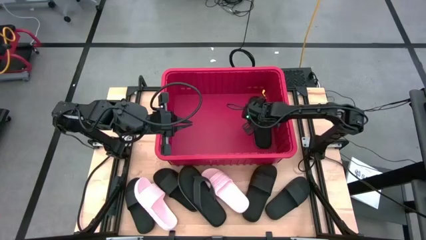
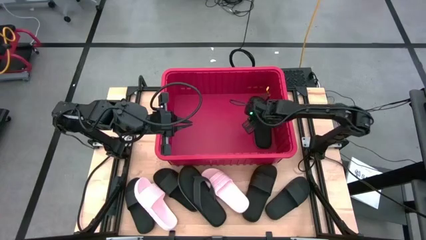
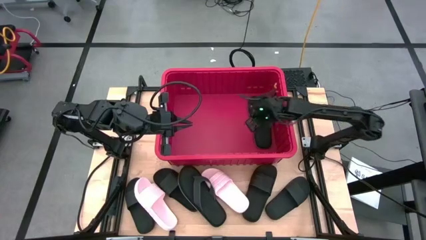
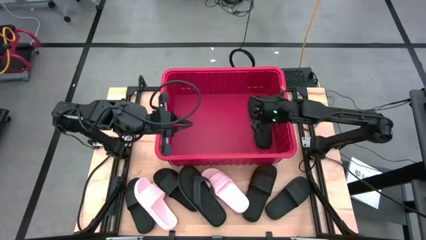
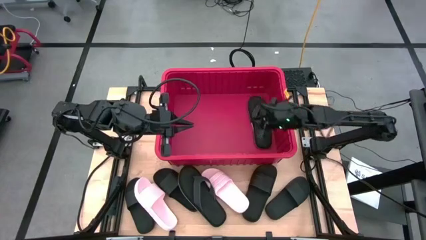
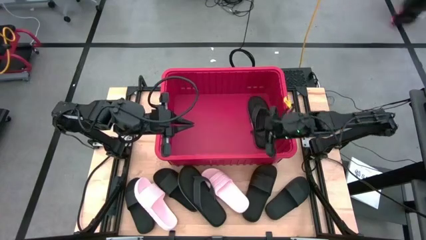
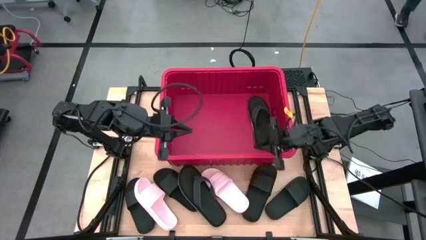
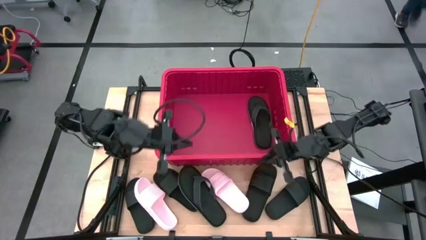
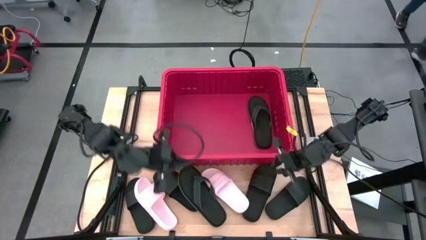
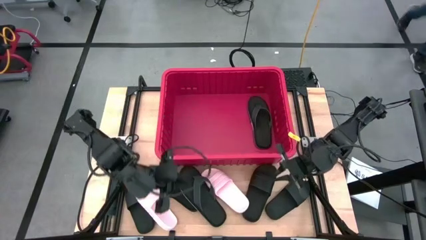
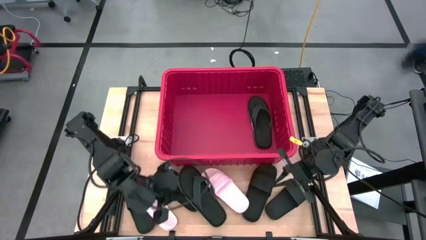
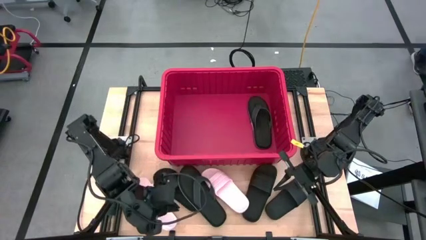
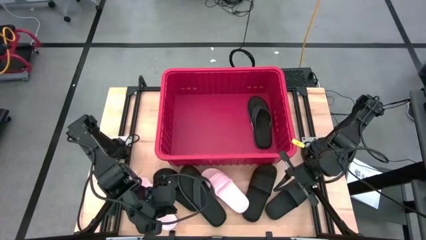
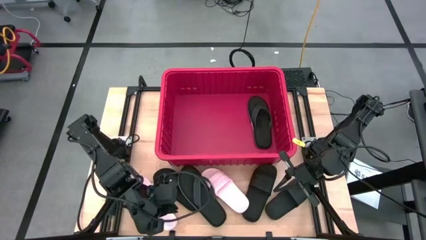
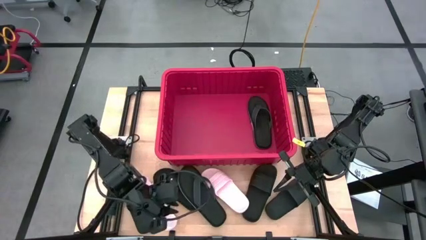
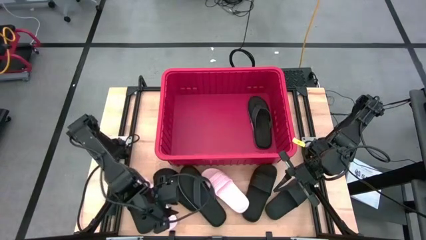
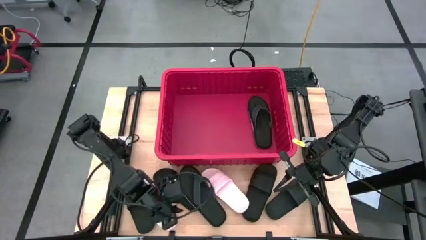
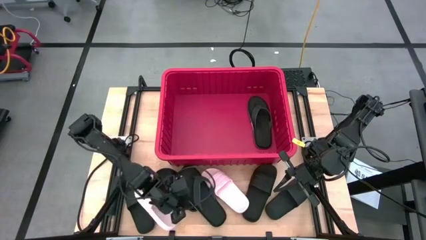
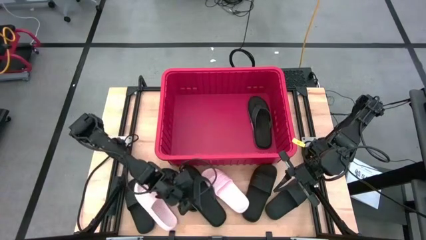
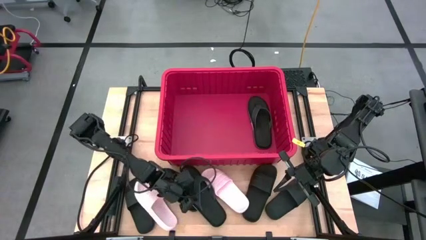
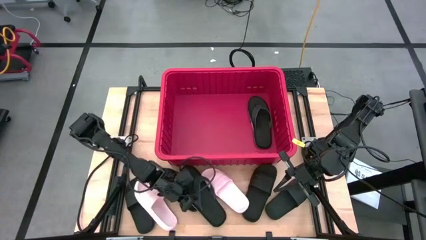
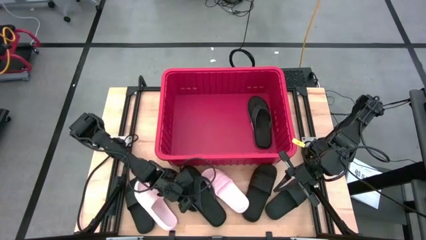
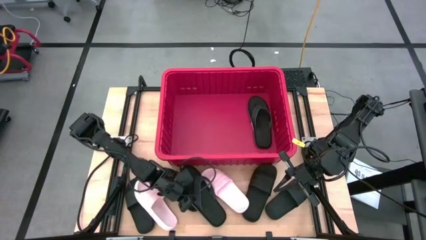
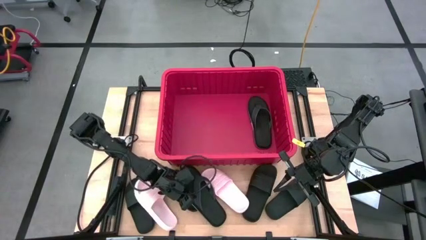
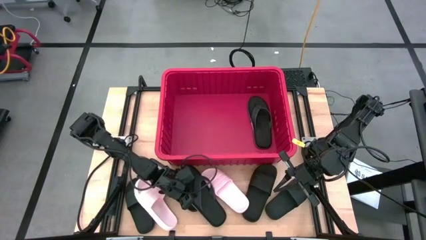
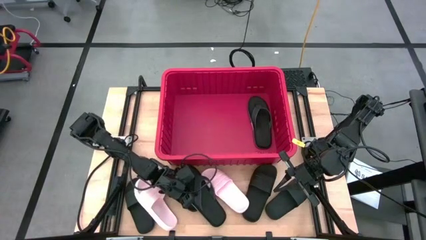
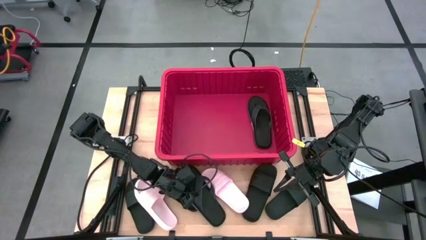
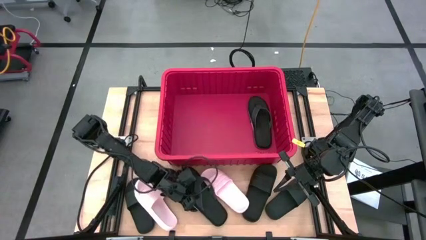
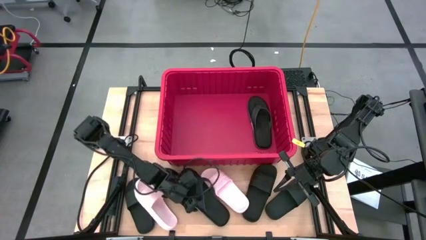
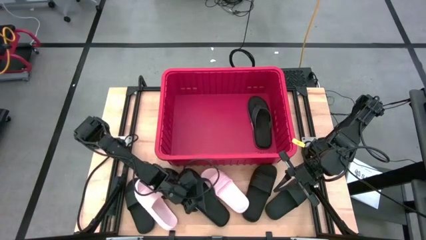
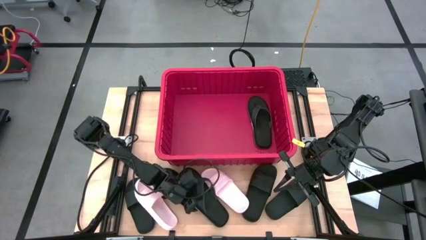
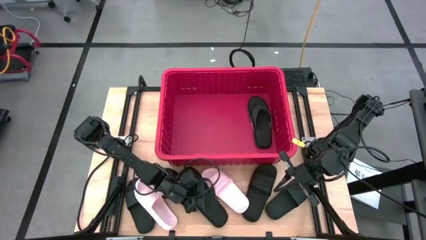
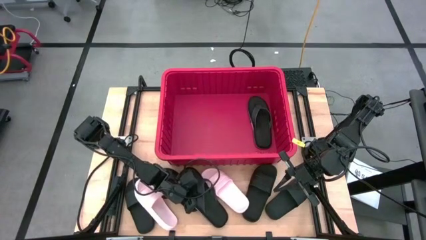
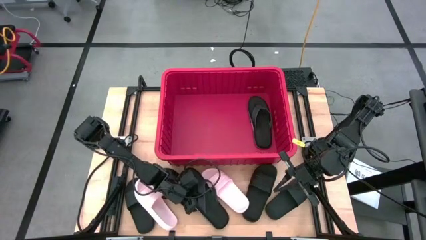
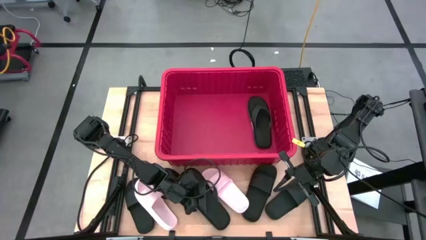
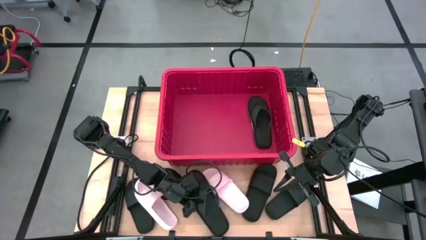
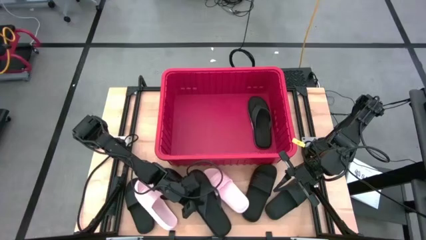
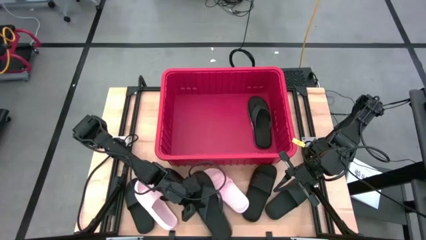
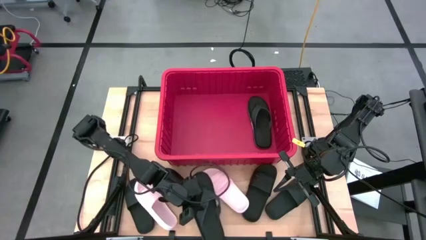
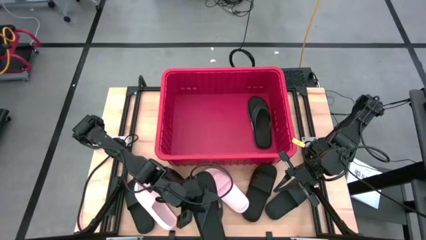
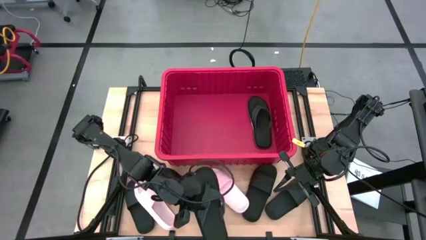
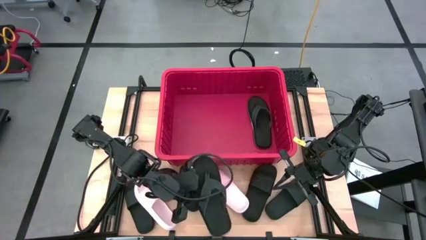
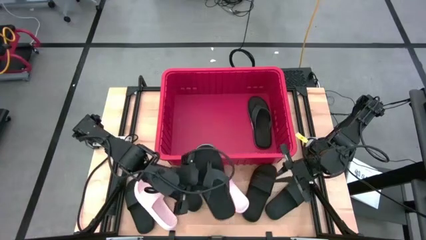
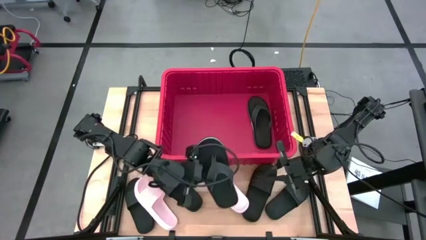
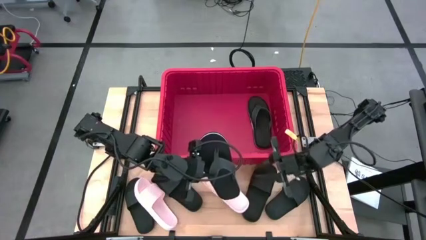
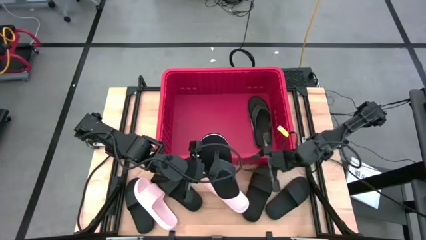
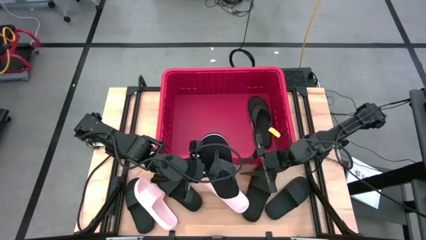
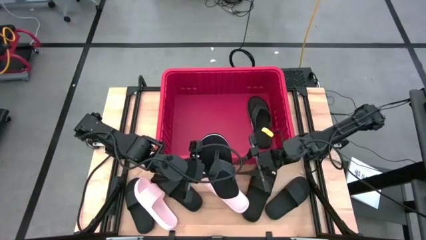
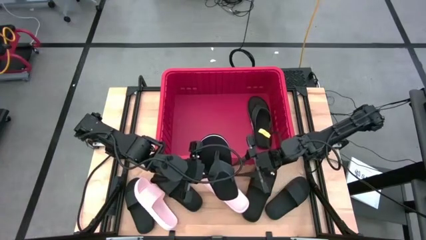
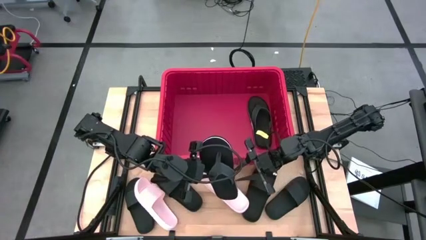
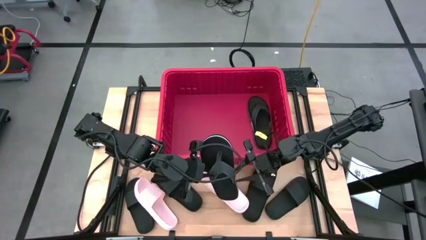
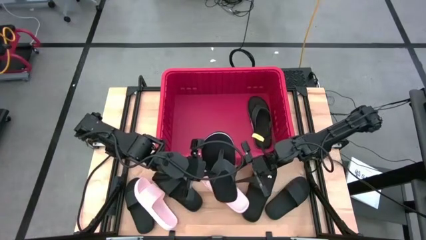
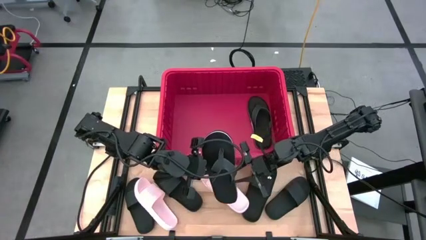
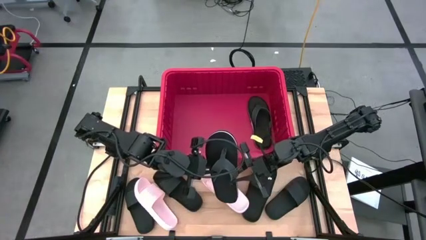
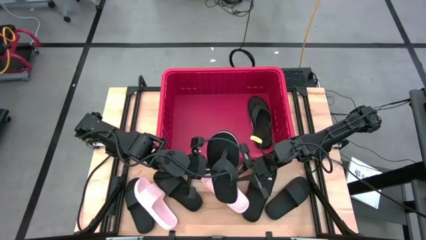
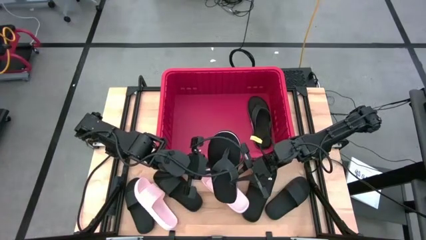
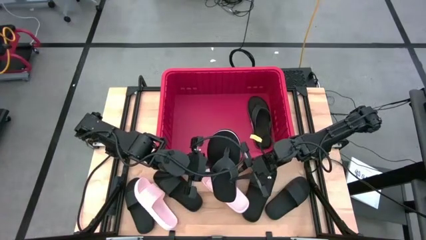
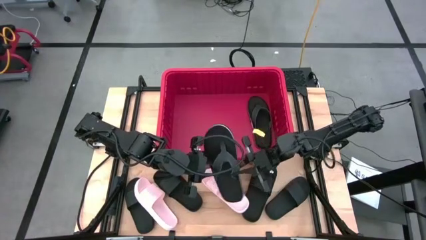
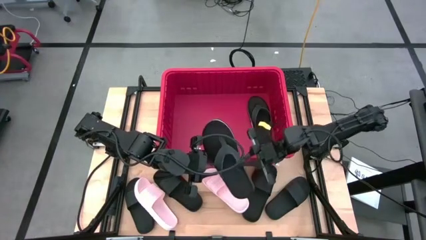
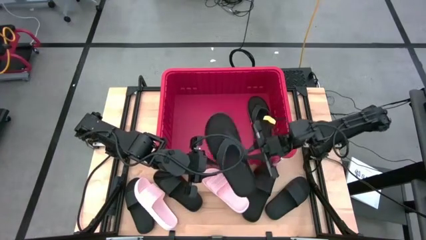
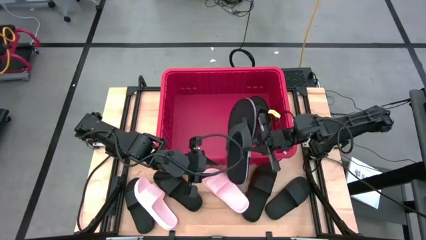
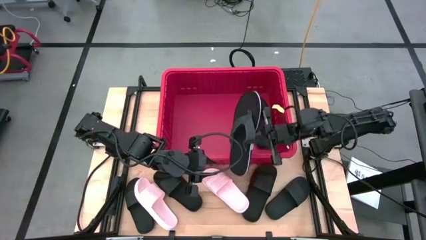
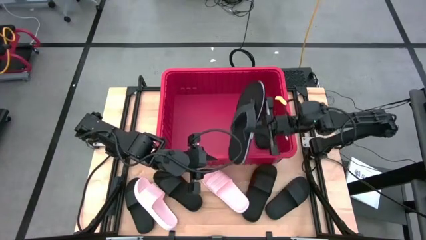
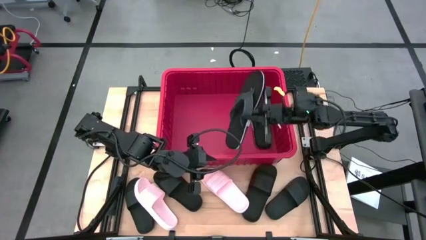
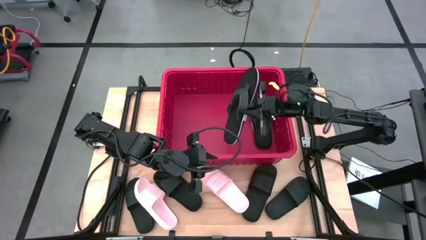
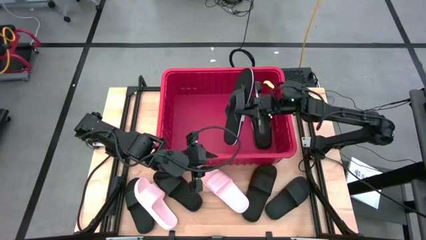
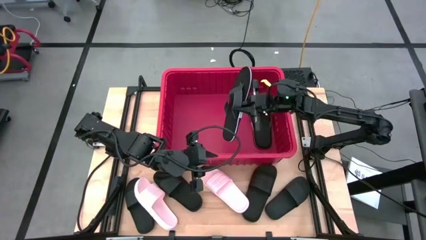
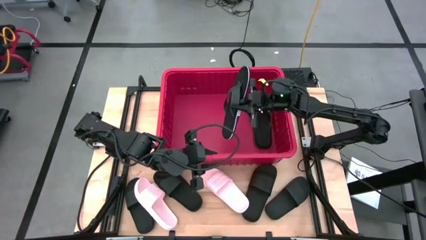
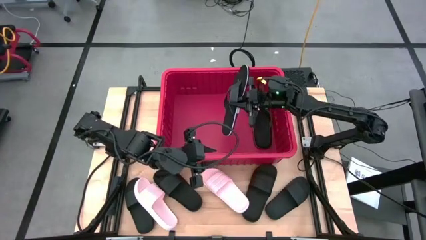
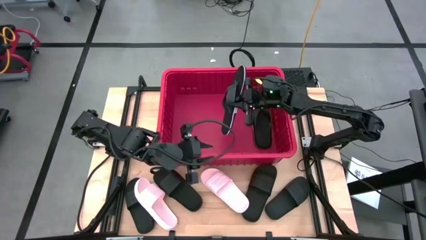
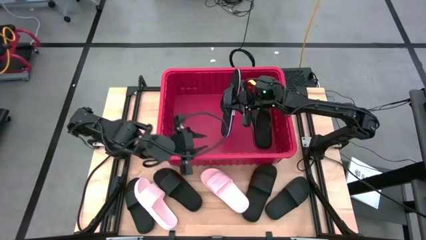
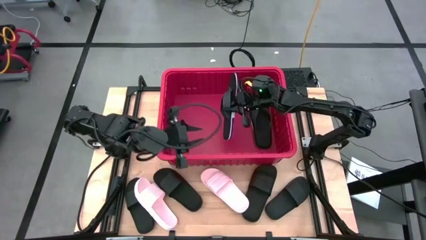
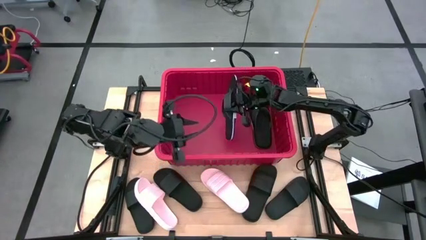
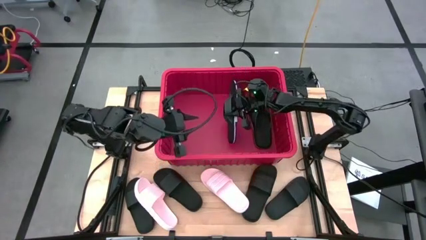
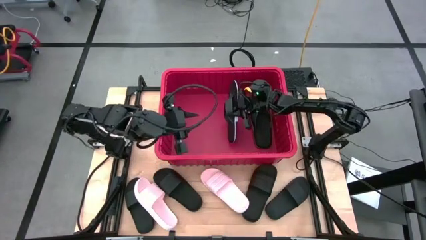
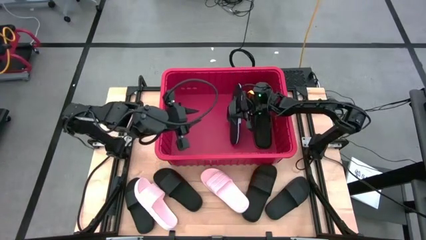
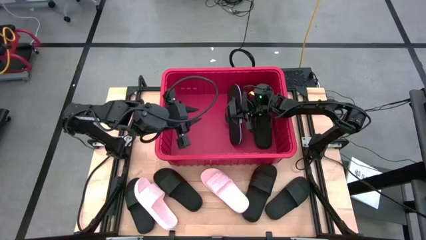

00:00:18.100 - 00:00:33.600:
Task: Pick and place slides into bin
Put the black slipper into the red bin
